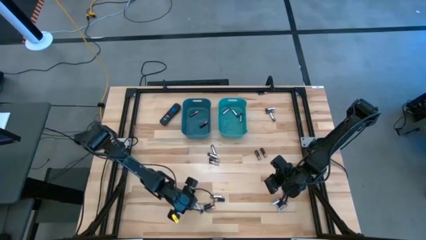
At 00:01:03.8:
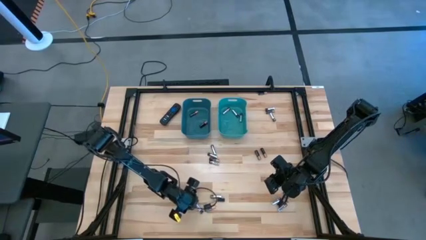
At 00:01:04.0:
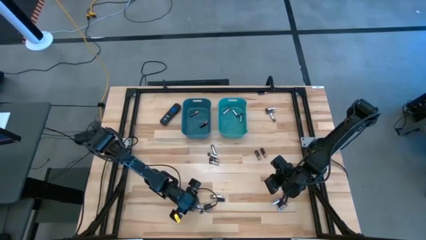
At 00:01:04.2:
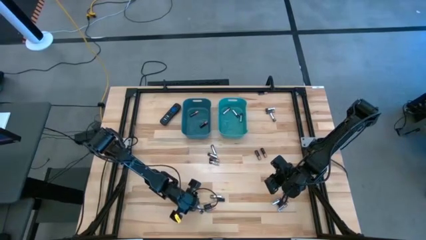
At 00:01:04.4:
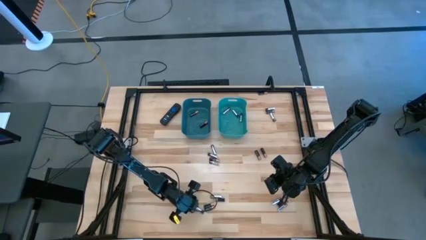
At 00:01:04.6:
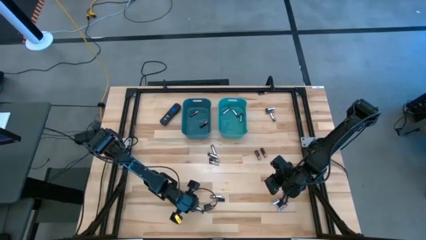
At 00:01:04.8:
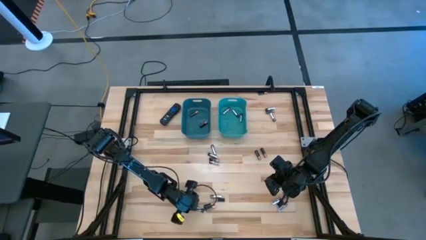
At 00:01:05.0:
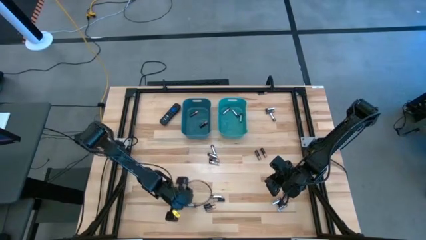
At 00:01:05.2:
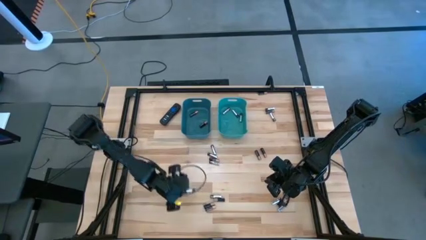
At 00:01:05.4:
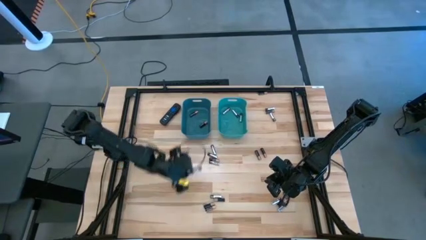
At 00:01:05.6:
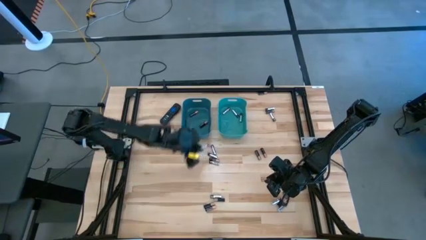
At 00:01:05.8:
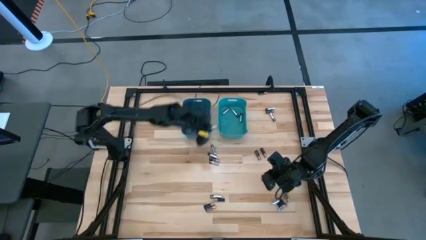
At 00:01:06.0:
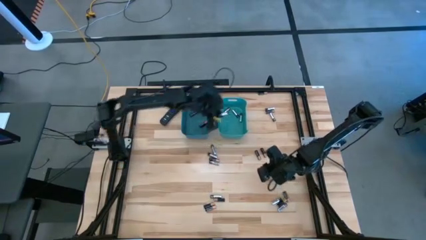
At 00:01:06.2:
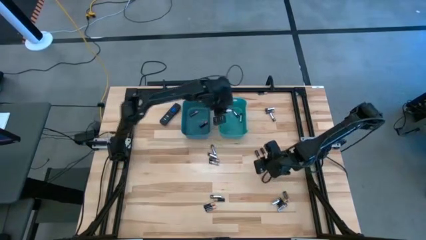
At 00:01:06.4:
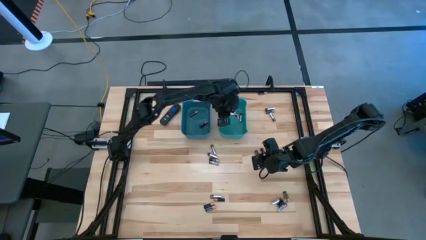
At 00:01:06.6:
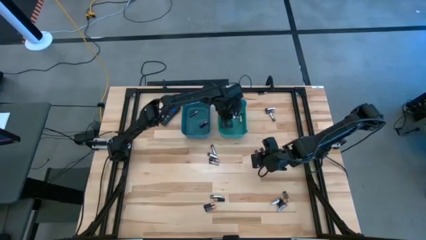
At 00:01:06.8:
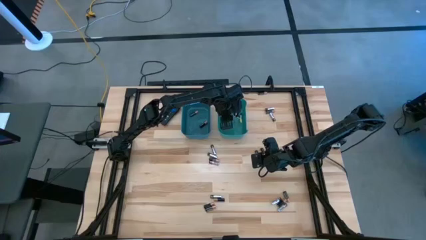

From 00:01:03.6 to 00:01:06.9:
Task: Sort batteries
Put the silver battery into the green bin

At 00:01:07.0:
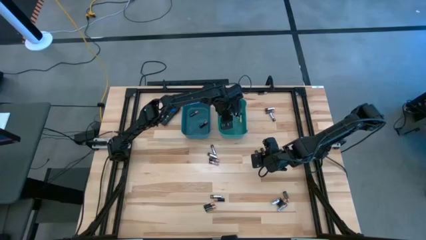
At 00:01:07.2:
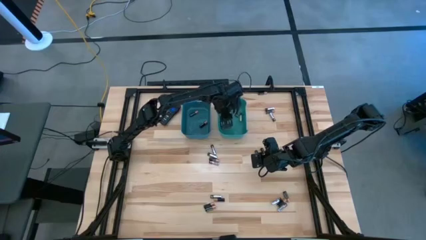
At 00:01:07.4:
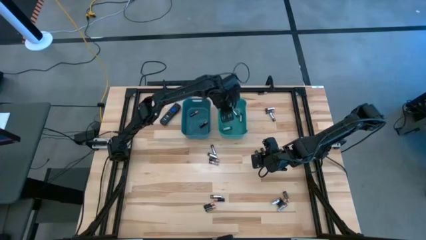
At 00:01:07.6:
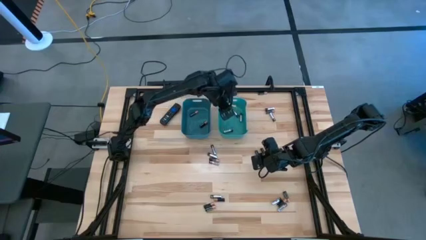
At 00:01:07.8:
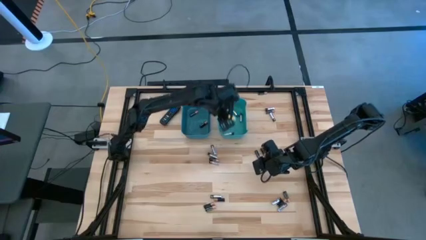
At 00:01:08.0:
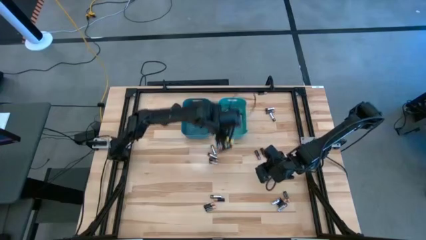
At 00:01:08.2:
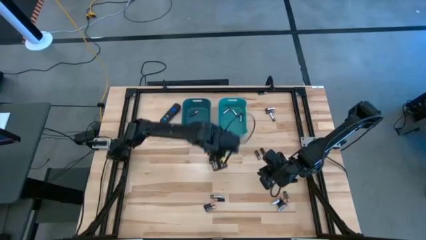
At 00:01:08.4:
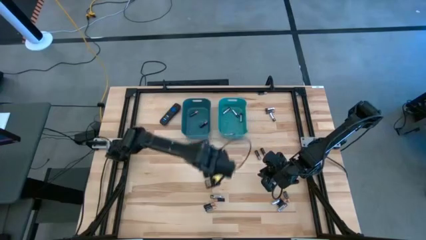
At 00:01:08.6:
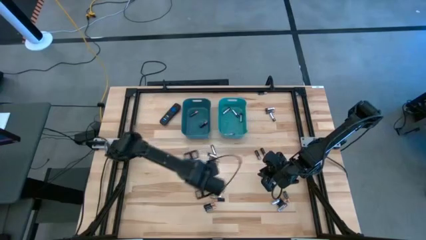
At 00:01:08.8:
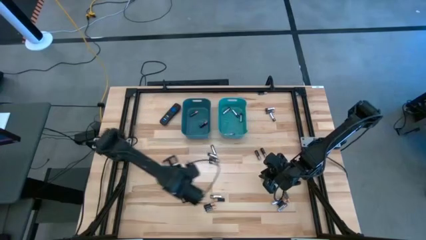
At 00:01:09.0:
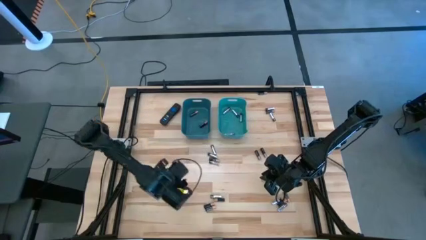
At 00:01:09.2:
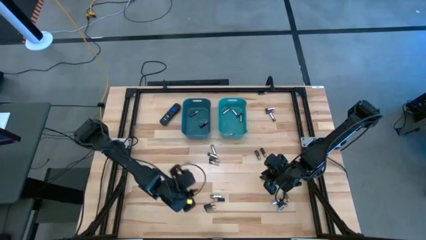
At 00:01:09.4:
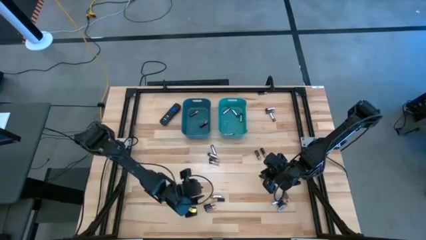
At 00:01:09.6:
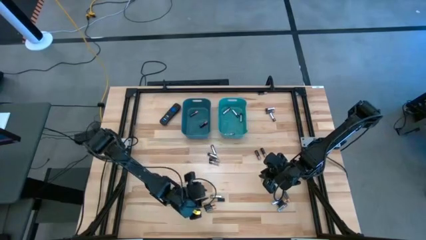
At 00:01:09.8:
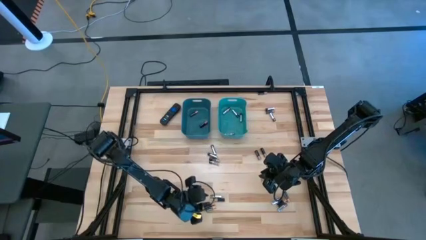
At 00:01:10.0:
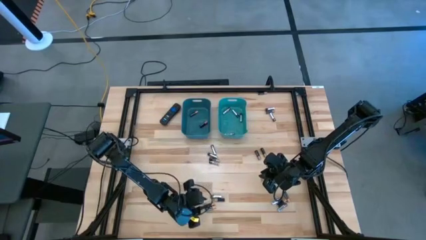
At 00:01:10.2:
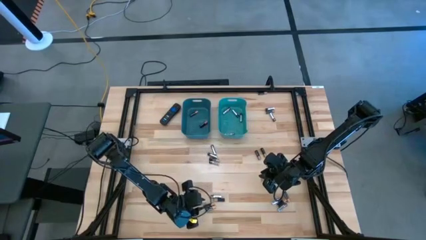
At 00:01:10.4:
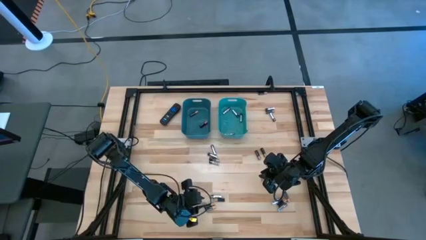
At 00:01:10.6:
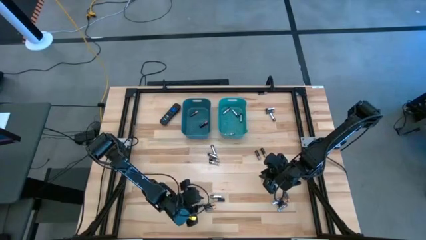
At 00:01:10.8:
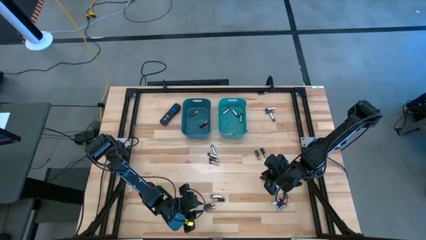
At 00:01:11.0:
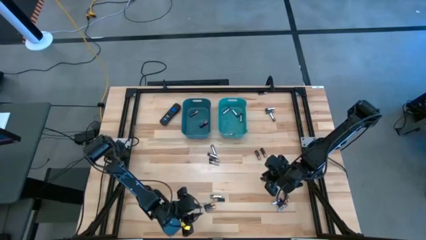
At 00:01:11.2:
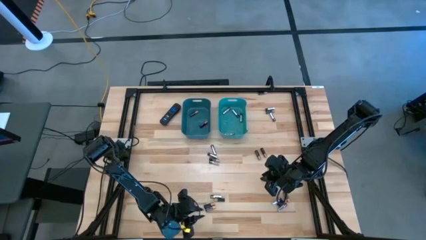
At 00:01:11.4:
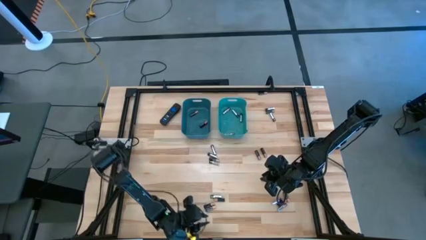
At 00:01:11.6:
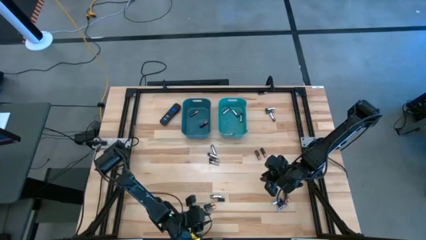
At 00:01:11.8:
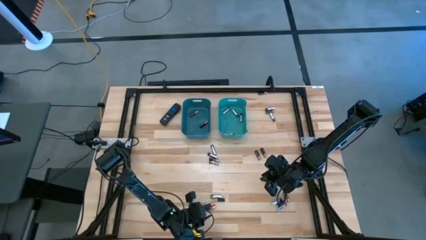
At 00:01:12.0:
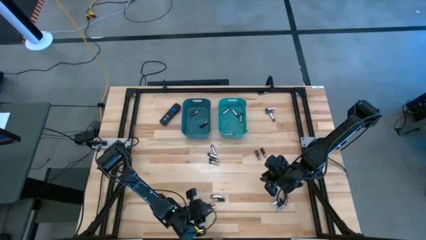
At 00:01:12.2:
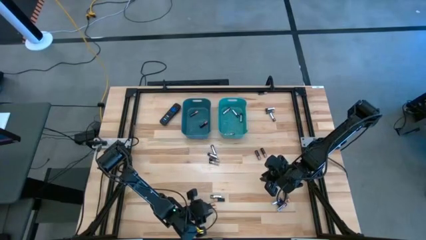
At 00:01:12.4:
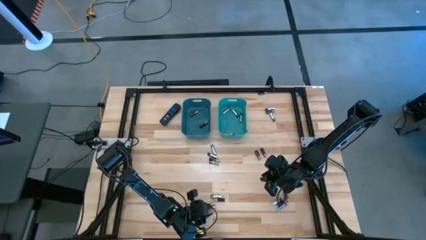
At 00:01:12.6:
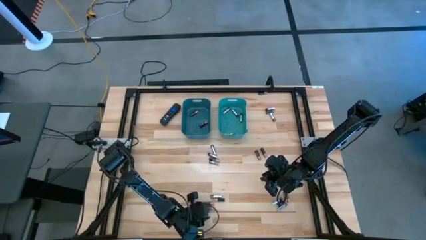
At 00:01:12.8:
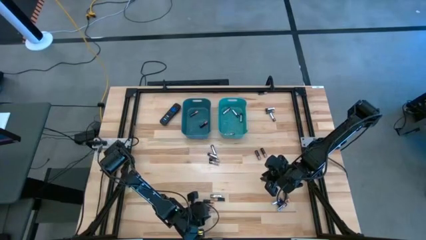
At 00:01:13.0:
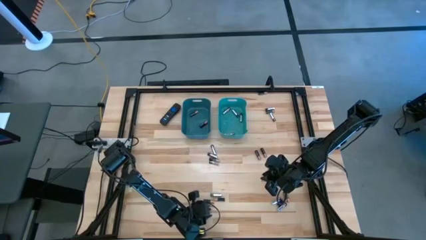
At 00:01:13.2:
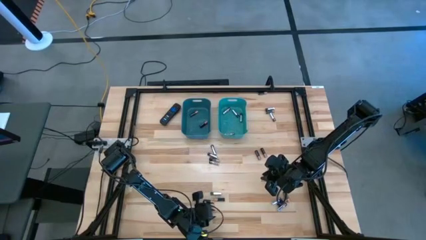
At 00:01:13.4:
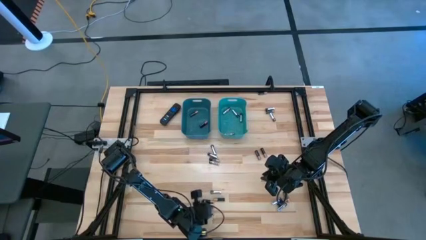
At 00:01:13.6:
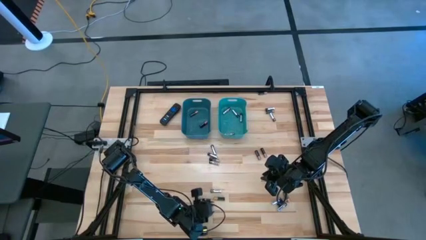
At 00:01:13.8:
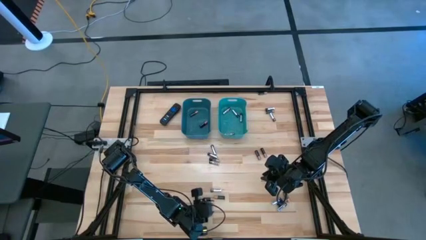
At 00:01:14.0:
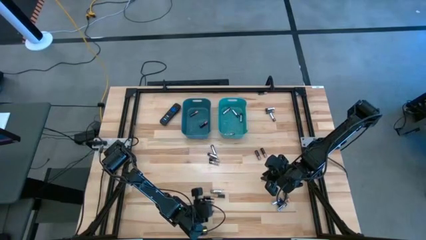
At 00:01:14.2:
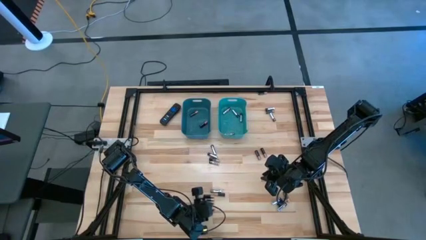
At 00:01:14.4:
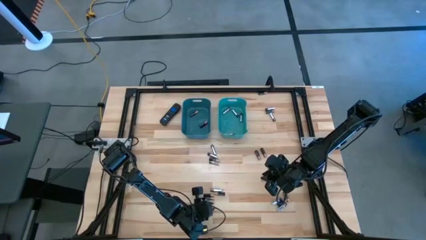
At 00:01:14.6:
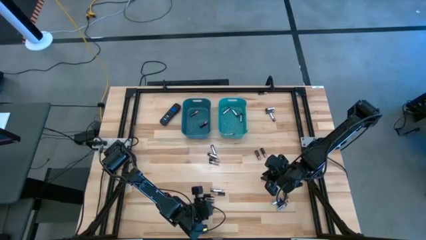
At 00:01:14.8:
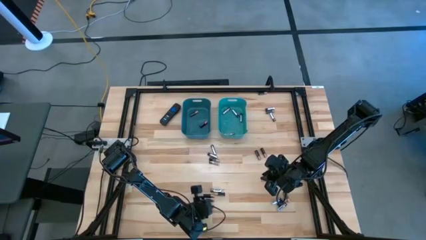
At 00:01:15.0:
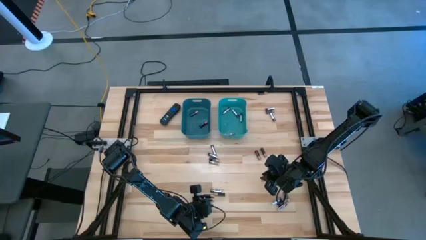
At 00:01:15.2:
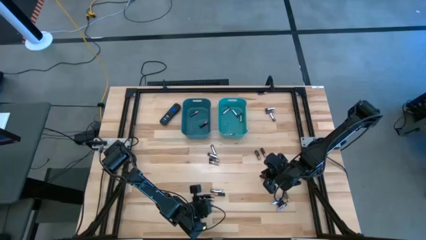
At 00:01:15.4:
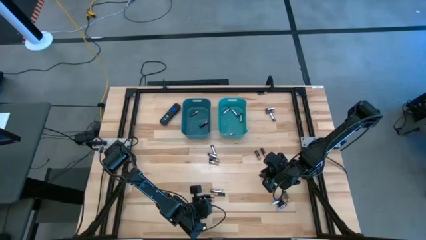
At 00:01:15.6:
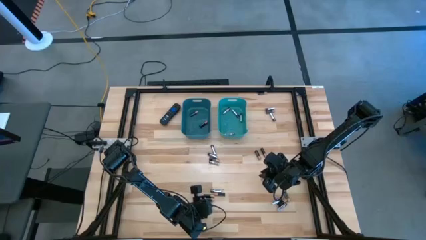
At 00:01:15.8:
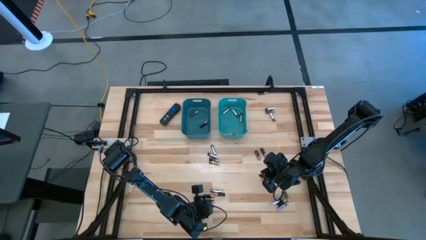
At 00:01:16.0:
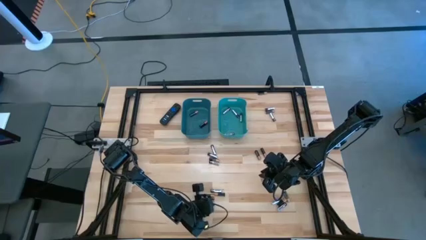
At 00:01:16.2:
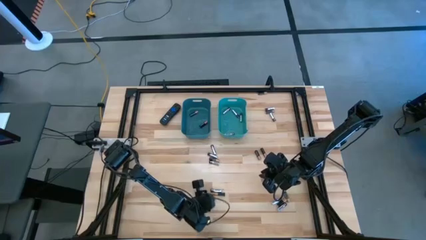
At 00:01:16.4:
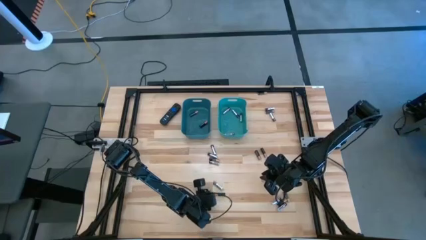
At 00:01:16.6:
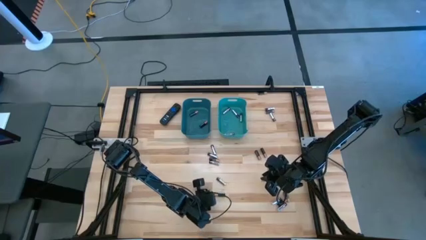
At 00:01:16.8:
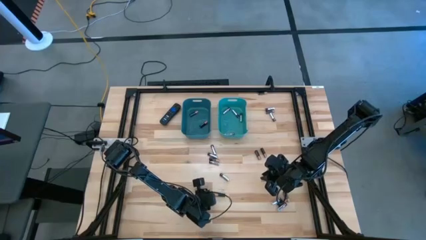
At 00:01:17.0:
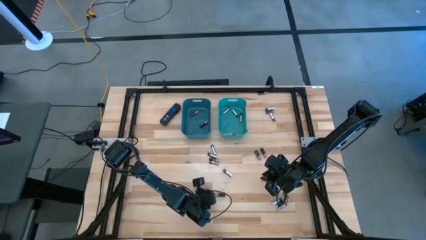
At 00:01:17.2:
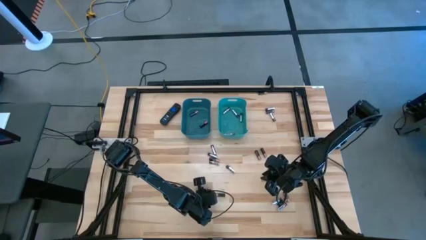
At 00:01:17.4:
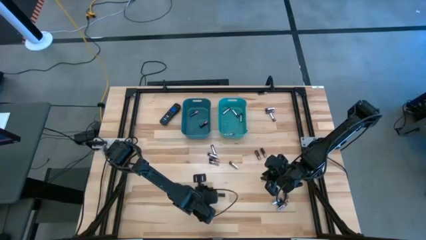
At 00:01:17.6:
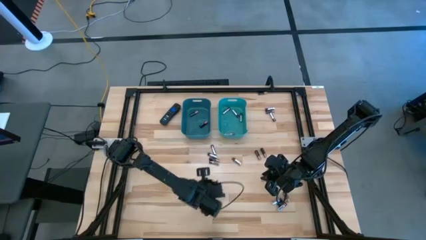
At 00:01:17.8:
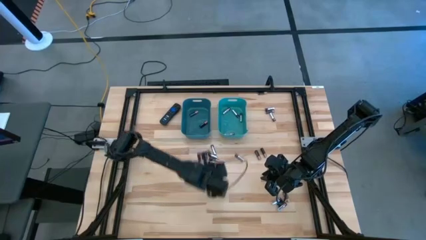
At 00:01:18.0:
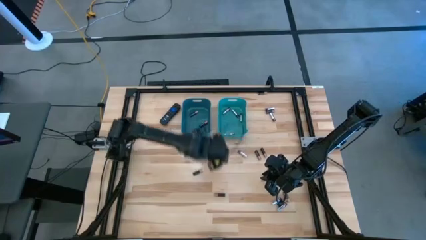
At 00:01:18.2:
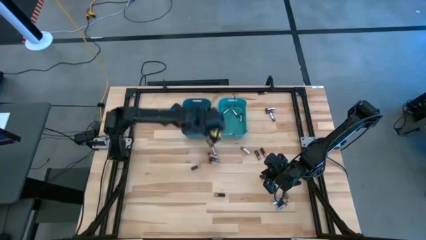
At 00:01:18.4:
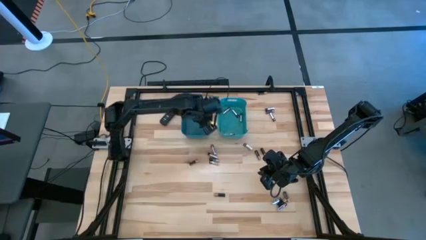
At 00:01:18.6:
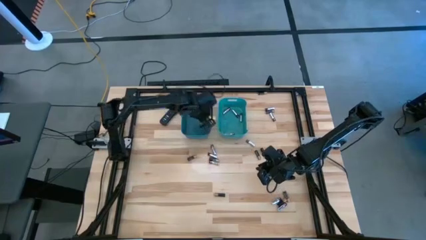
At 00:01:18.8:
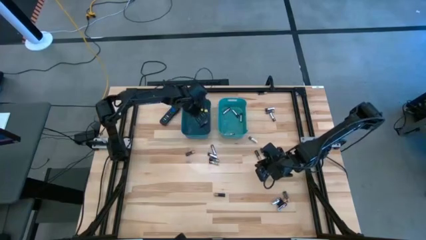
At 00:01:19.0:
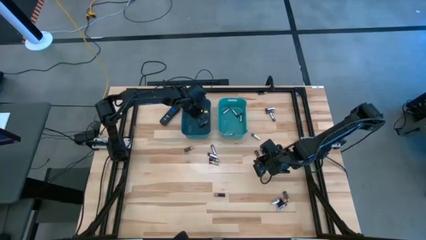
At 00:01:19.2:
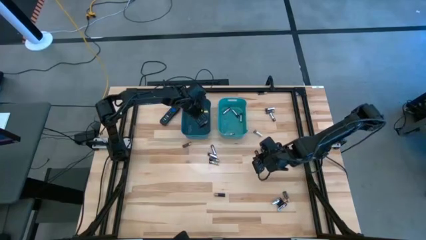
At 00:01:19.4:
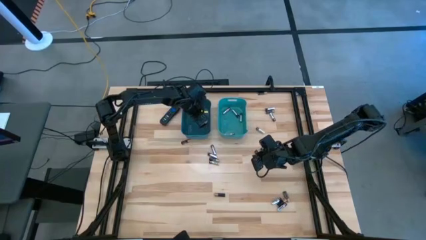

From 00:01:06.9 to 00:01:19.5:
Put the black battery into the blue bin
